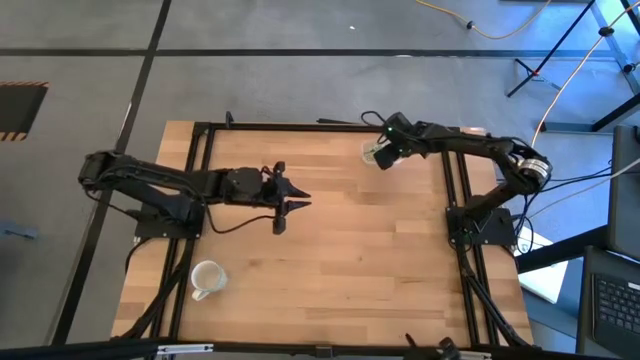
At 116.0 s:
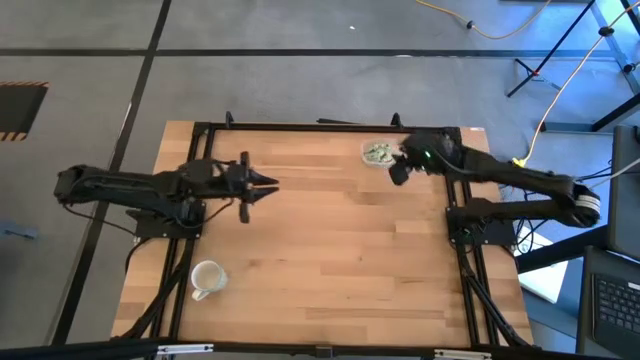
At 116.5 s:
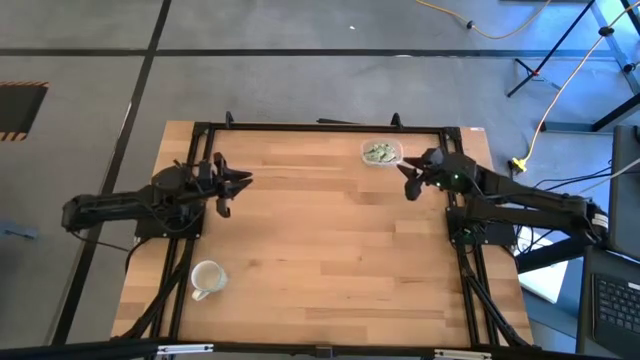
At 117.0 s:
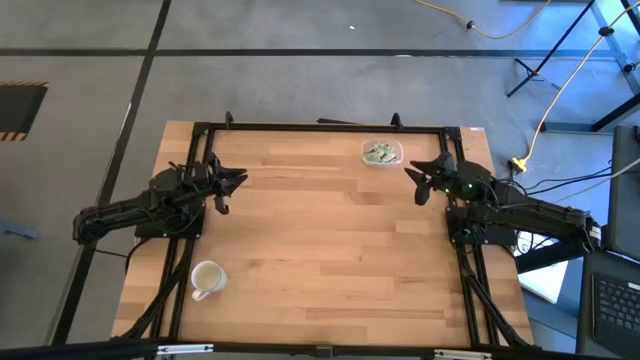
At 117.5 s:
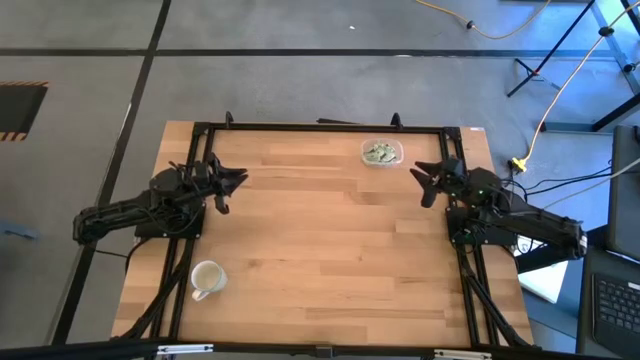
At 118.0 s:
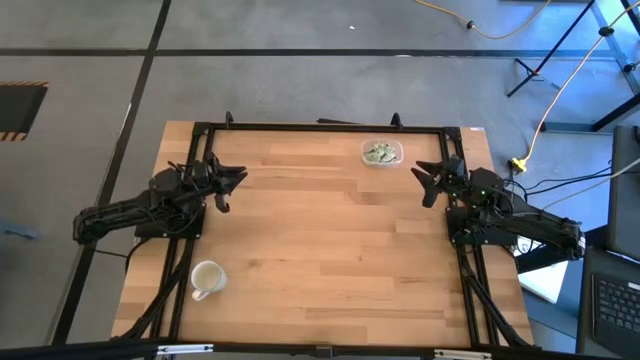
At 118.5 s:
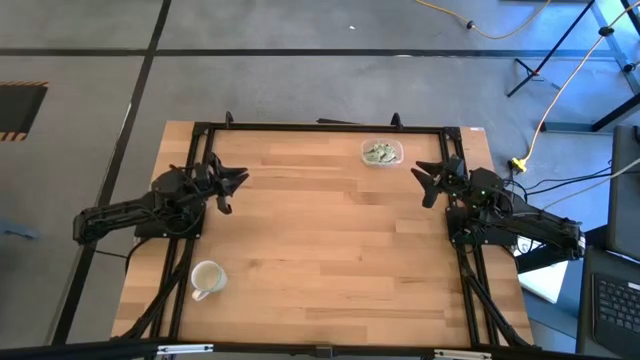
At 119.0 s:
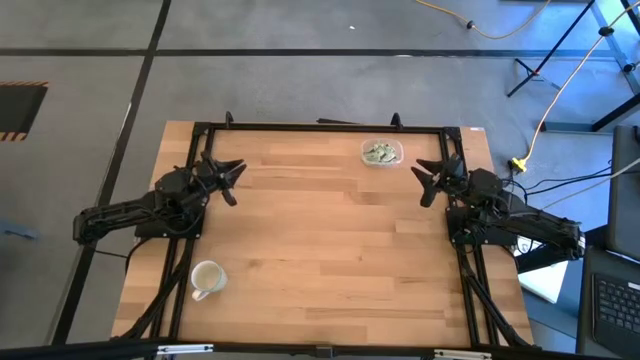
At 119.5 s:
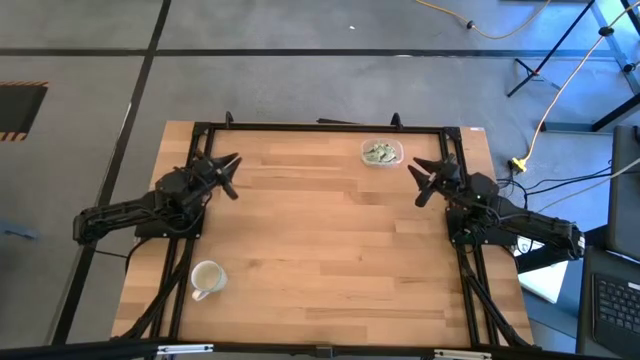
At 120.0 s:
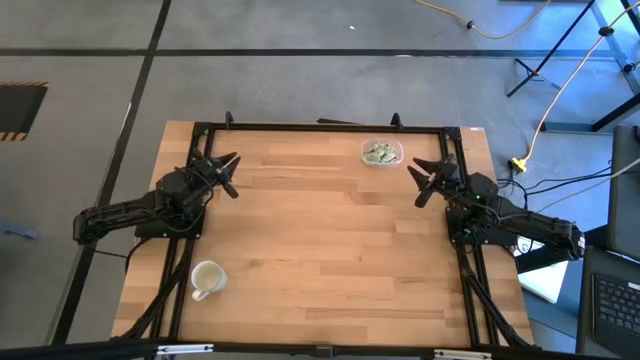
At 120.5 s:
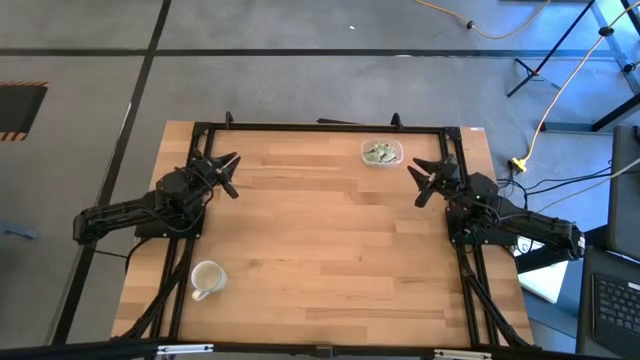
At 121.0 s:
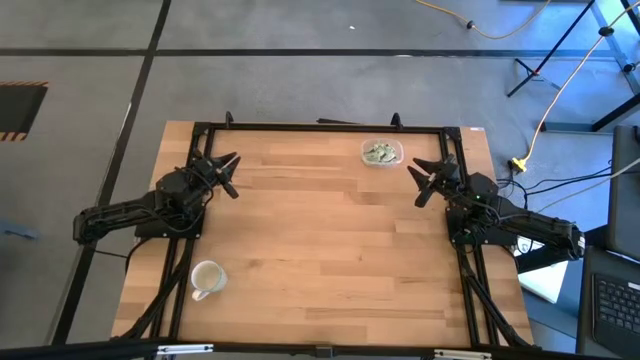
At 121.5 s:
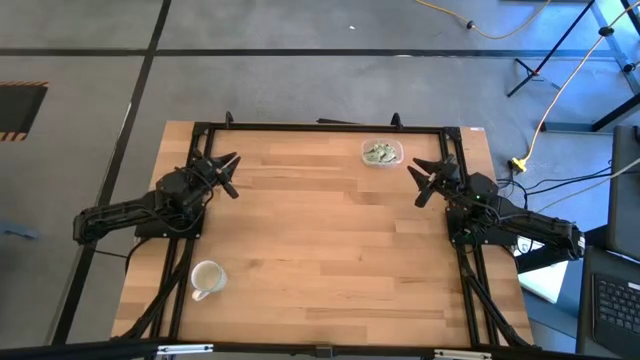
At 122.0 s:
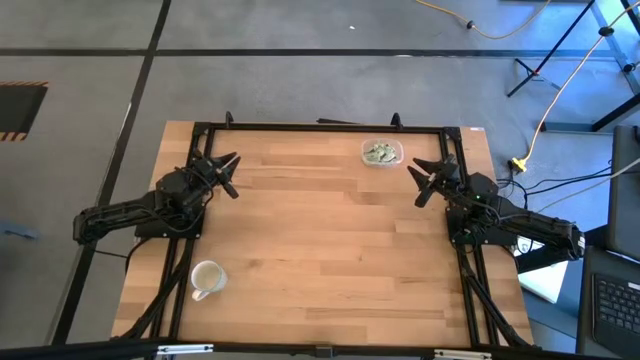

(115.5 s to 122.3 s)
Task: Pick and place Stevia / Truvia into bins
Return to Home Position

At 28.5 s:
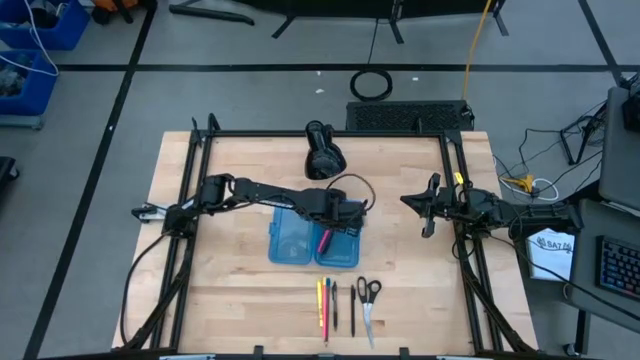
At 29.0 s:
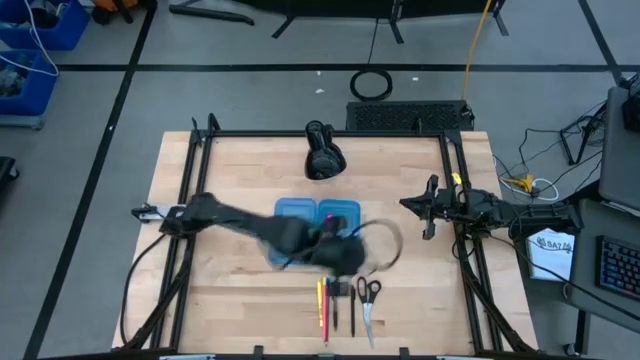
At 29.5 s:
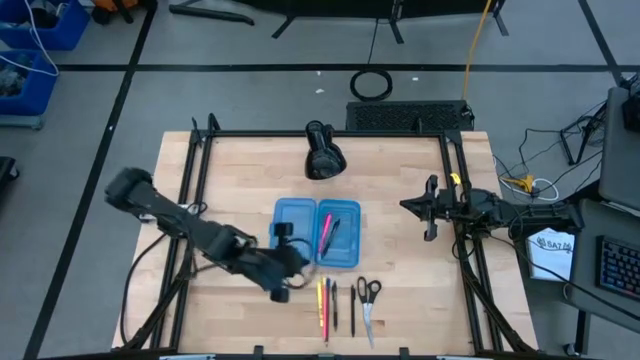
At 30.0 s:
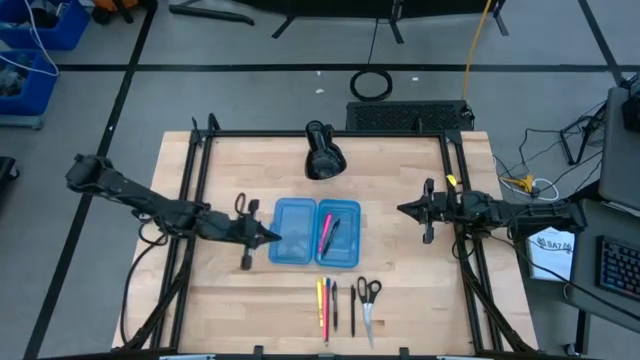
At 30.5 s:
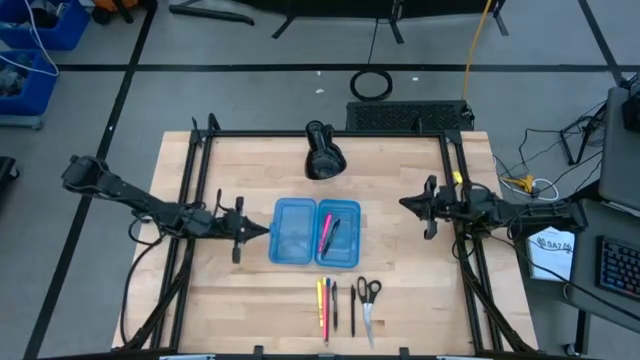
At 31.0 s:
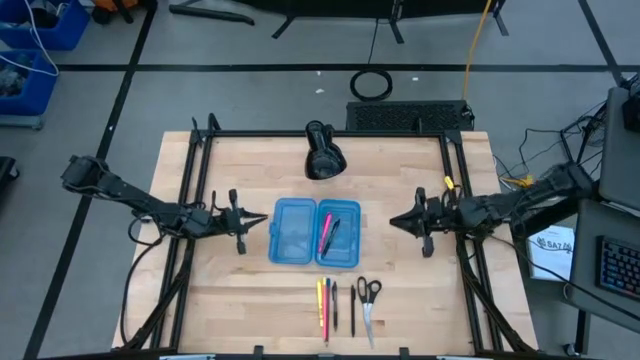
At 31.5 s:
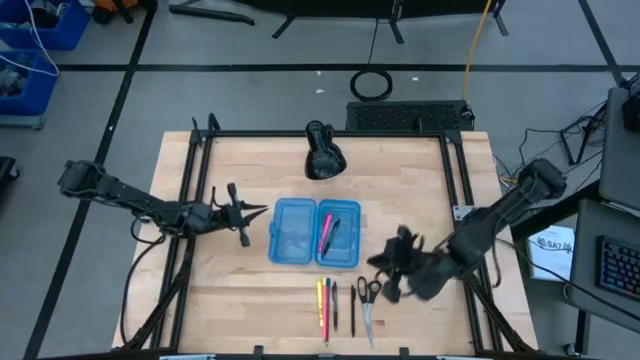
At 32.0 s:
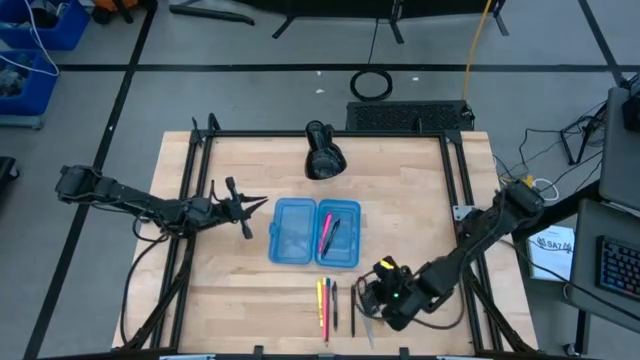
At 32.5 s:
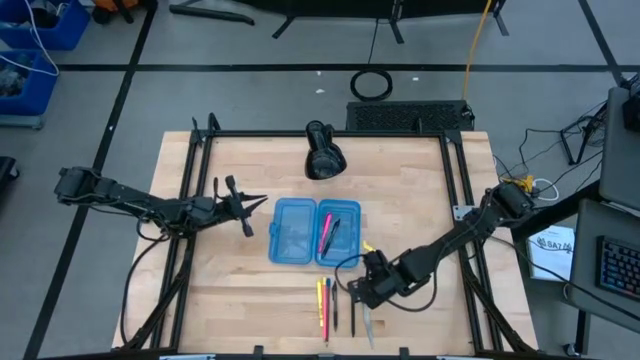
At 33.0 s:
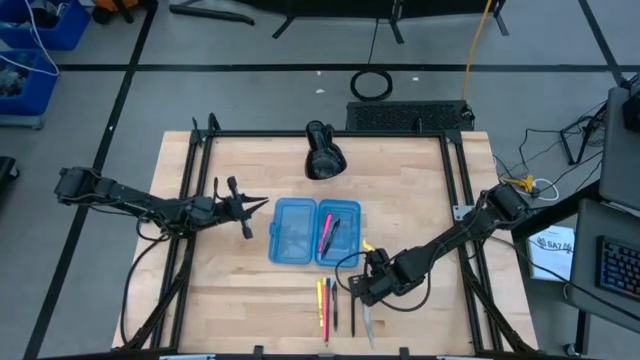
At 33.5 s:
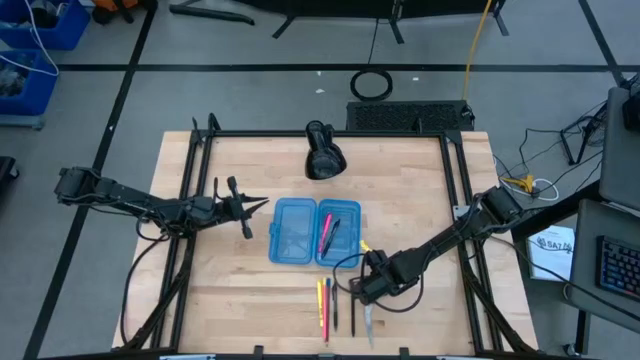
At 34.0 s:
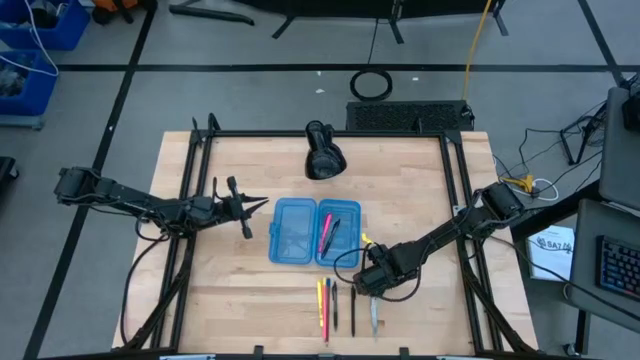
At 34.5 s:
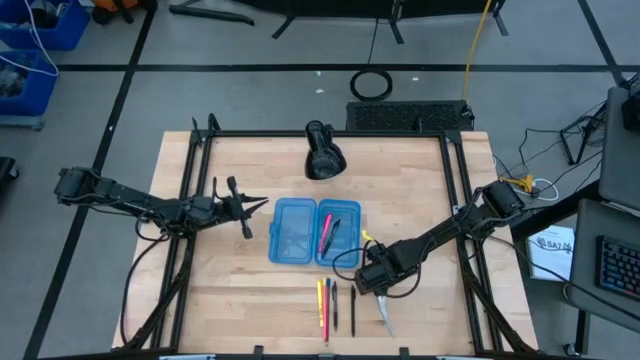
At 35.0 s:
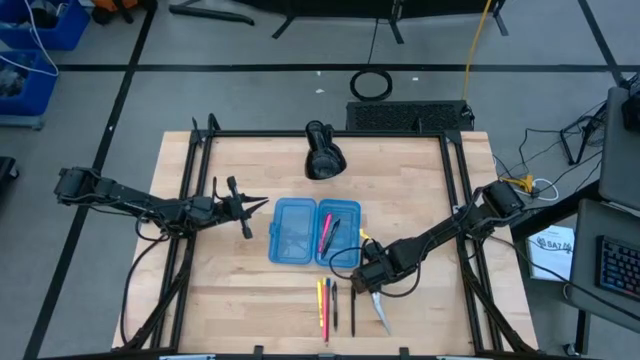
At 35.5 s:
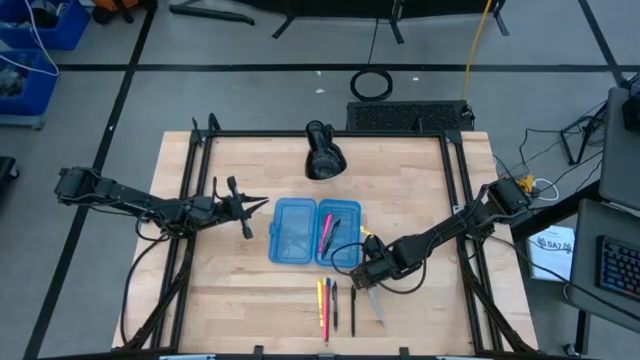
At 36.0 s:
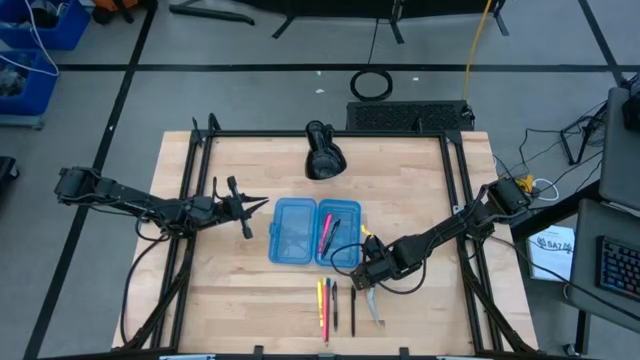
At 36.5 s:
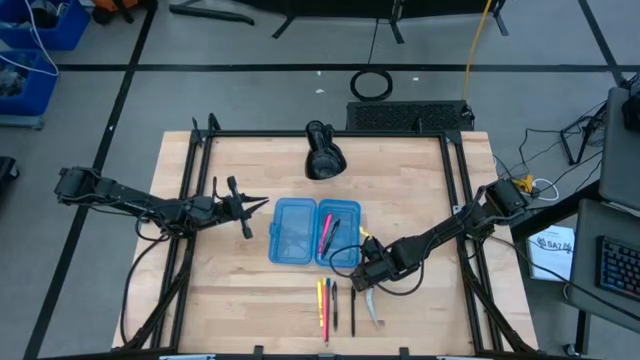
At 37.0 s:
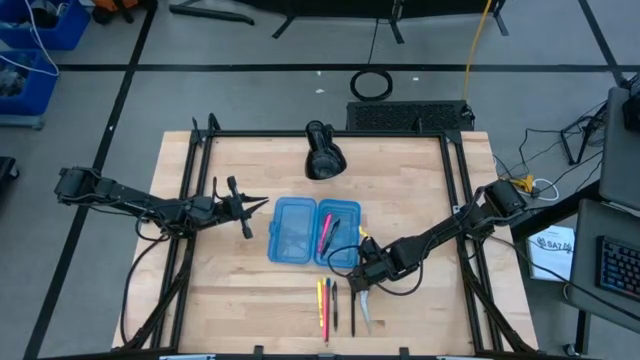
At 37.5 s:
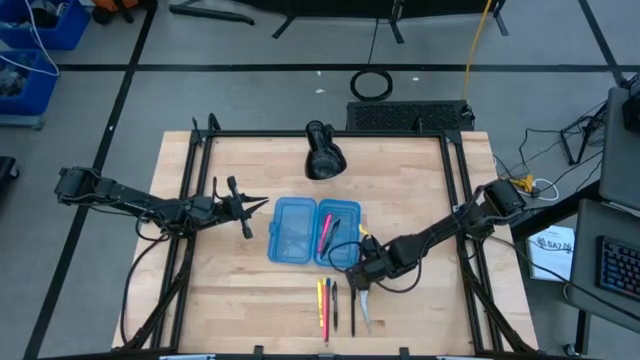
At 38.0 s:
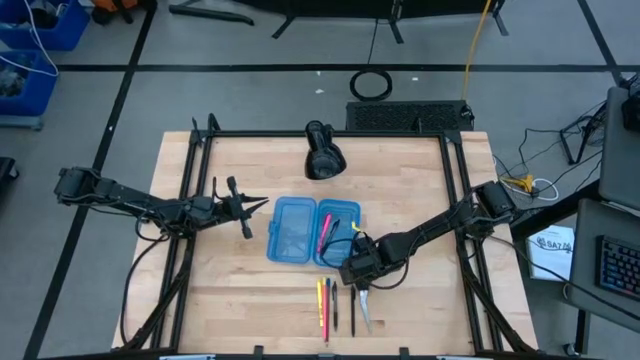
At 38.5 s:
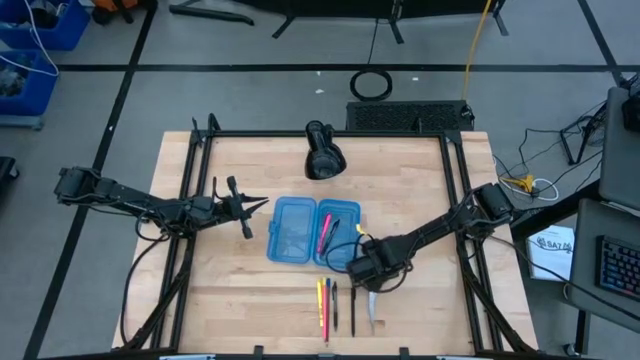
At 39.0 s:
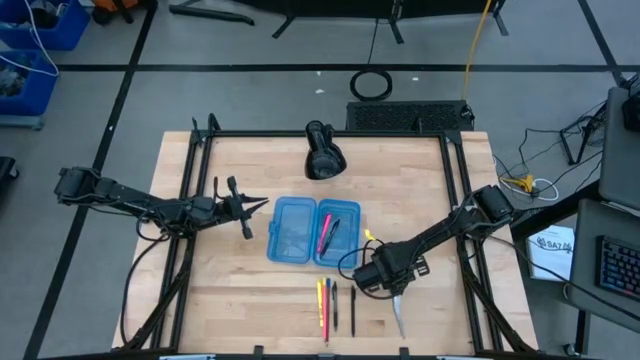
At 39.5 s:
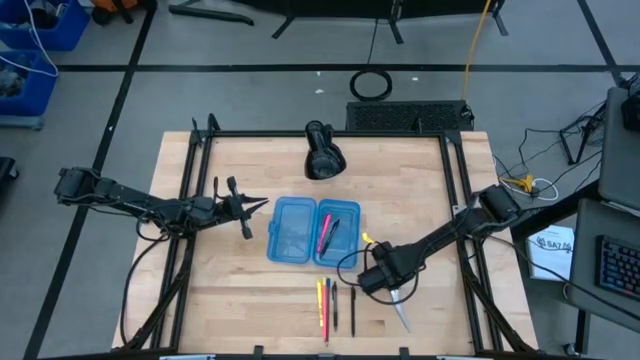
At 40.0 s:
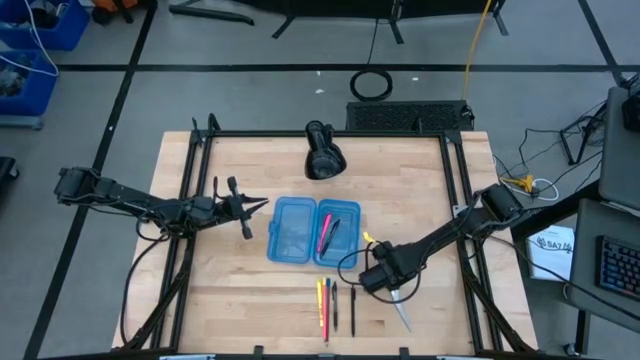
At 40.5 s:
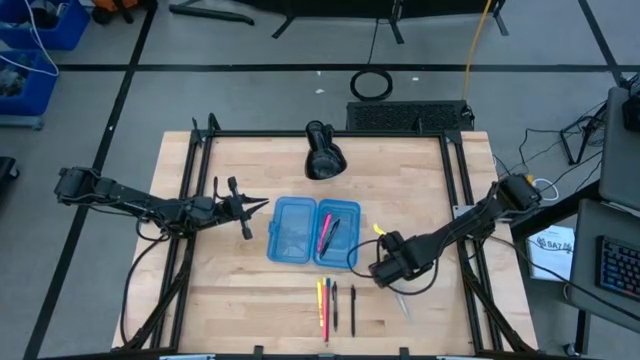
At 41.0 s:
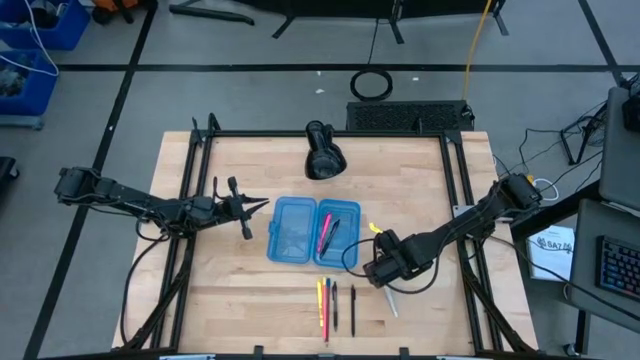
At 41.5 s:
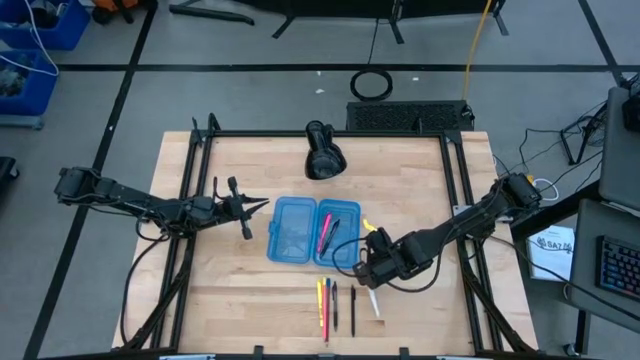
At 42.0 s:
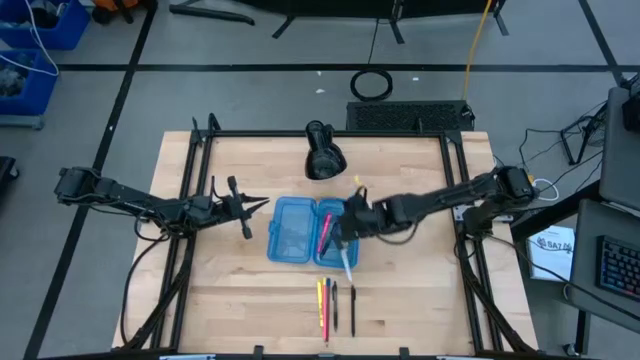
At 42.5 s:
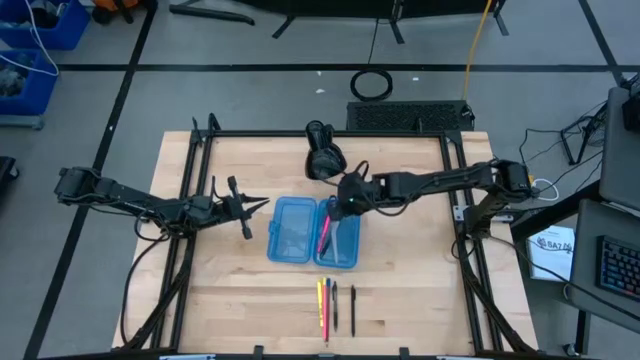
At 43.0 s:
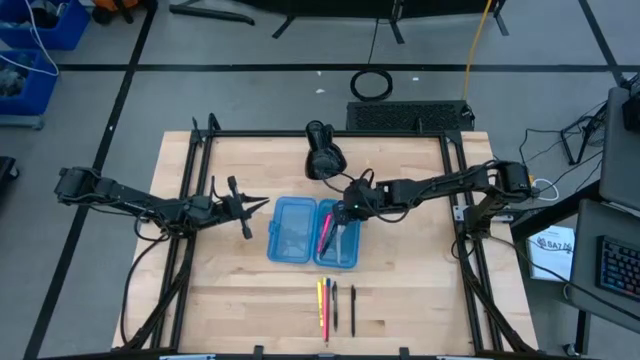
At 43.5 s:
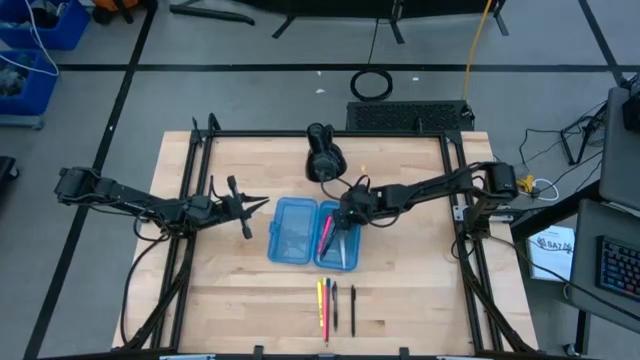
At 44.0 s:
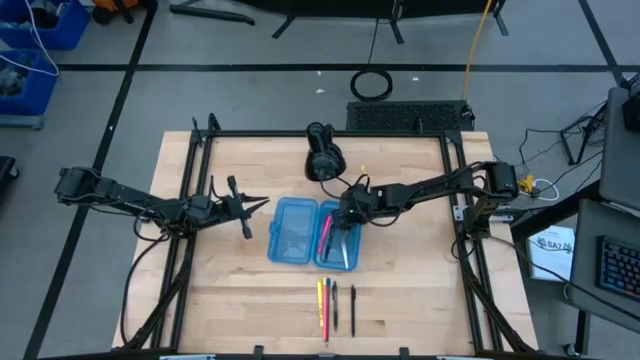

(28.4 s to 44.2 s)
Task: Pick & place school supplies into a supply box
Put the black scissors into the blue supply box
